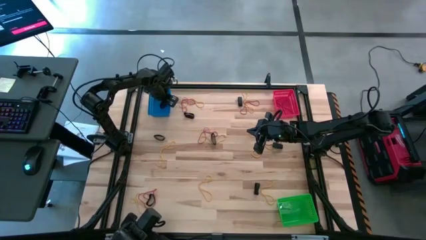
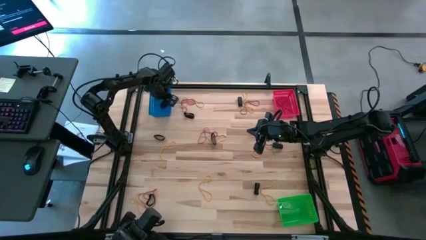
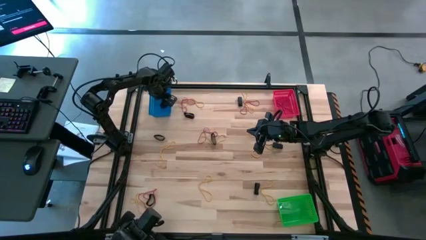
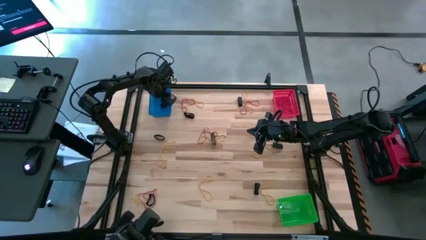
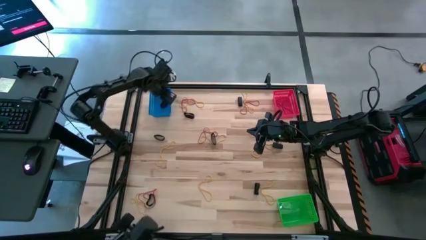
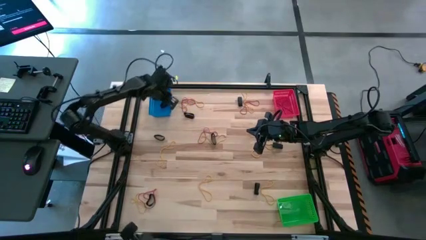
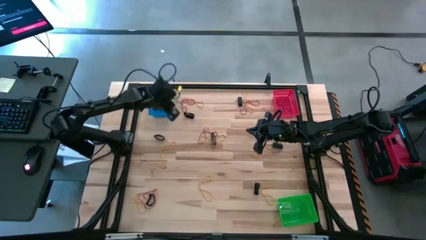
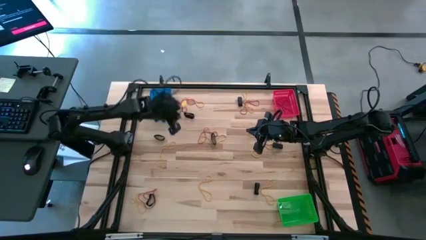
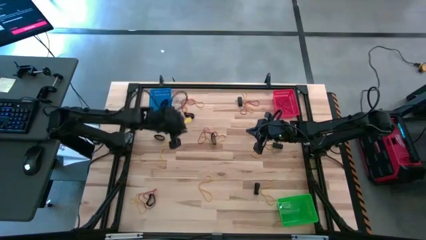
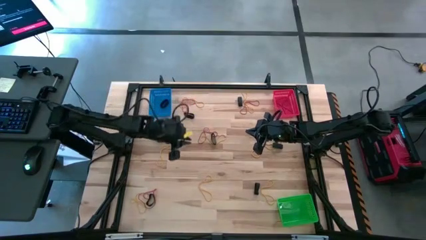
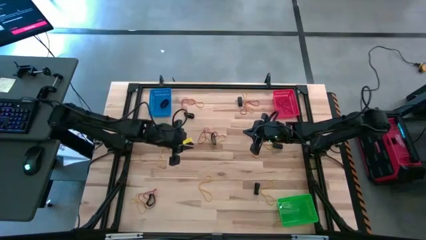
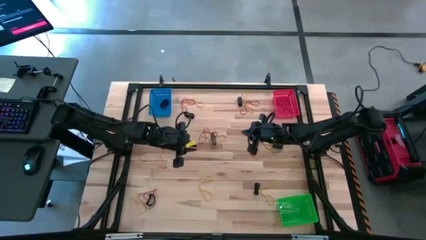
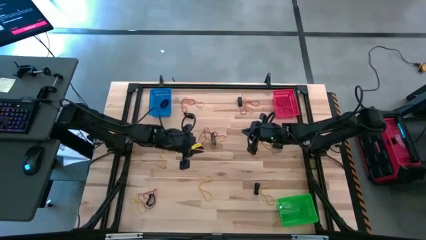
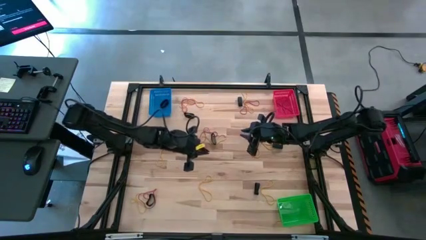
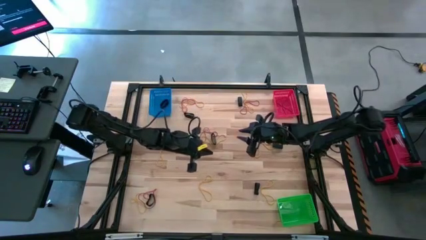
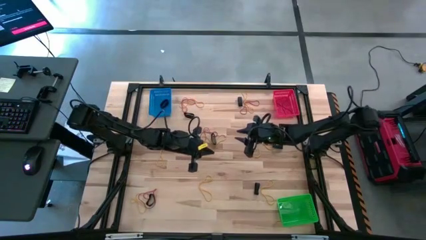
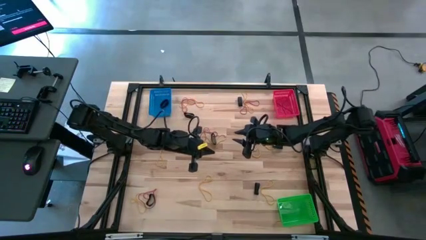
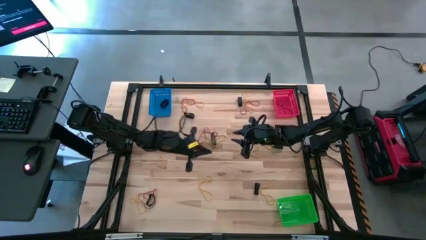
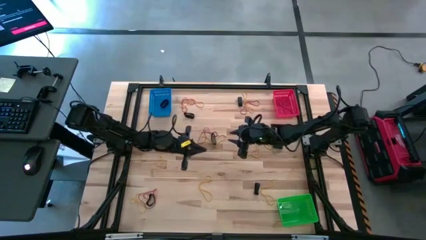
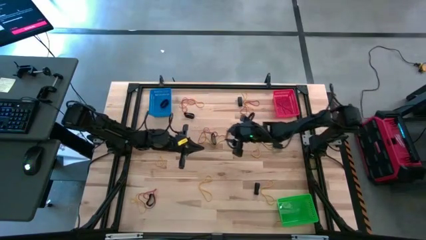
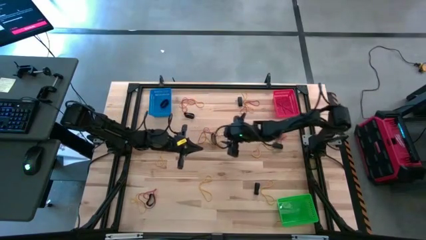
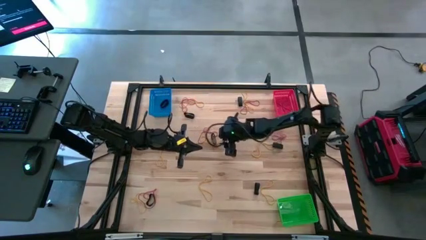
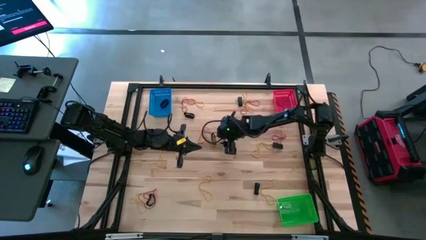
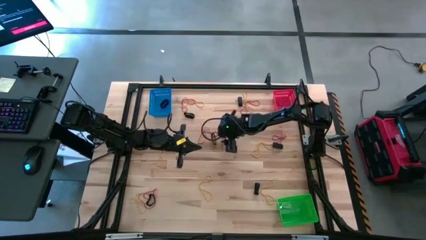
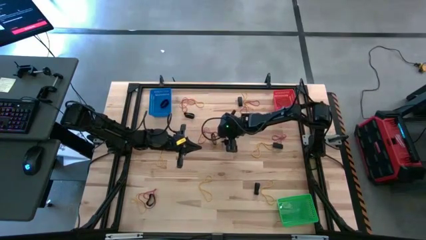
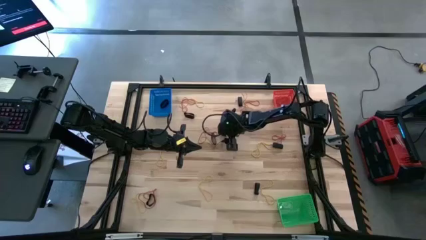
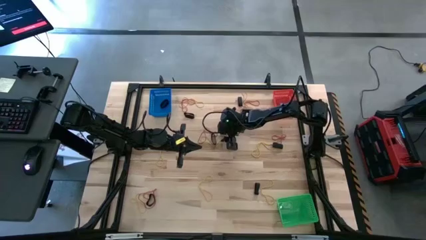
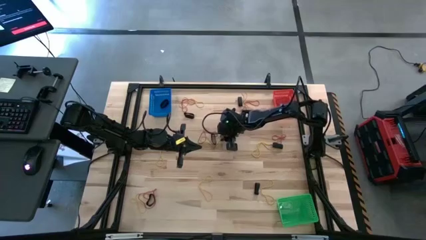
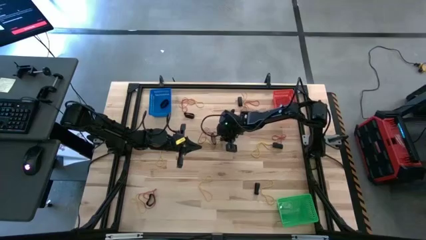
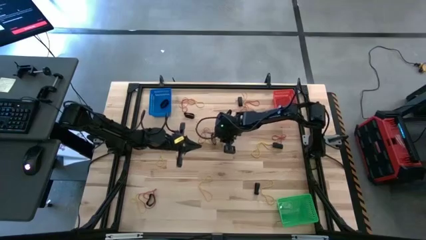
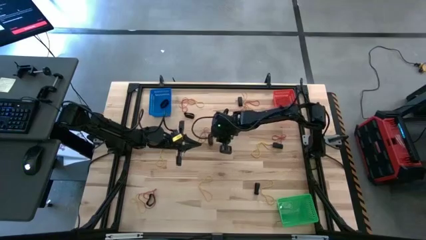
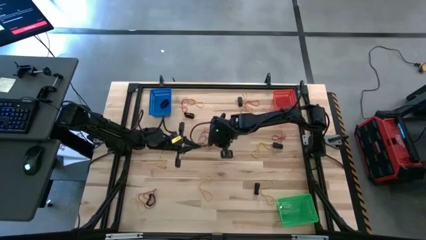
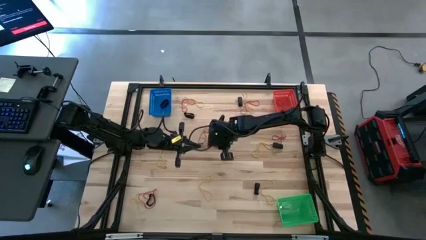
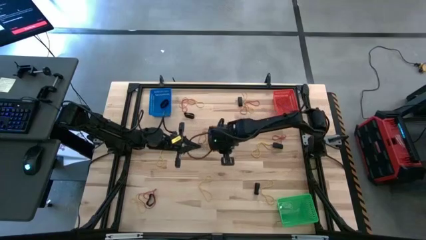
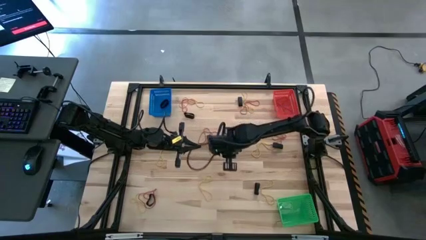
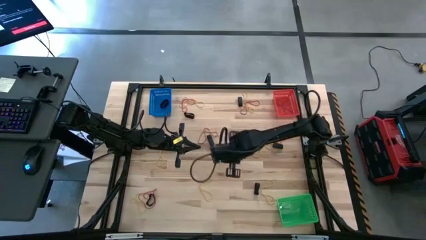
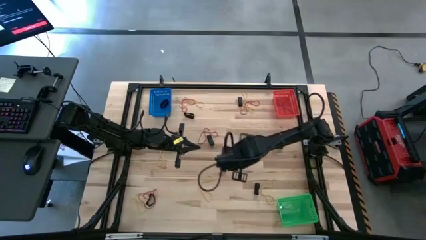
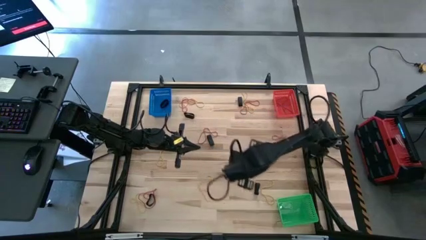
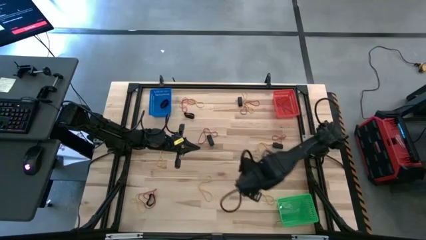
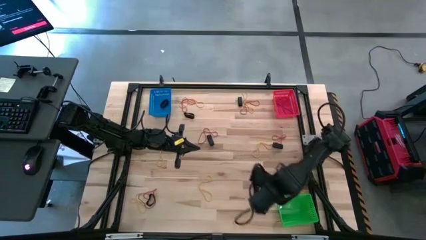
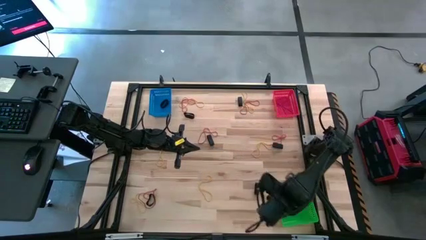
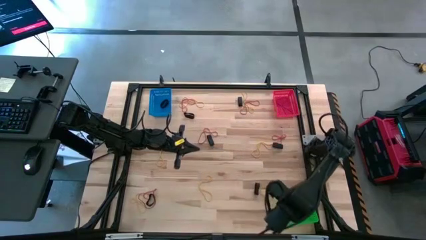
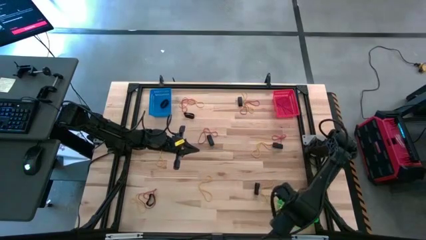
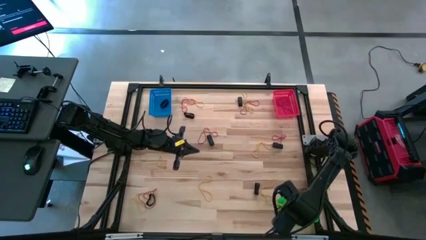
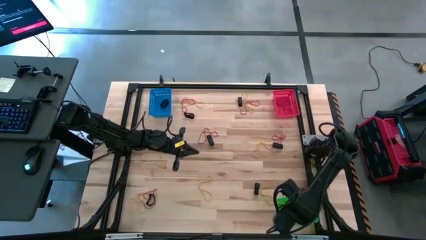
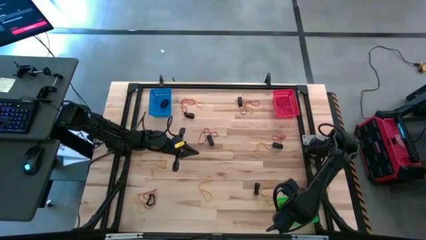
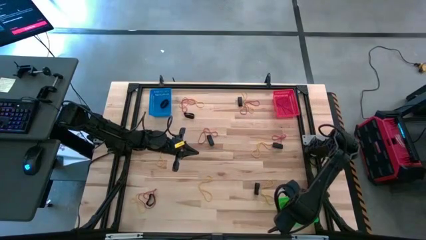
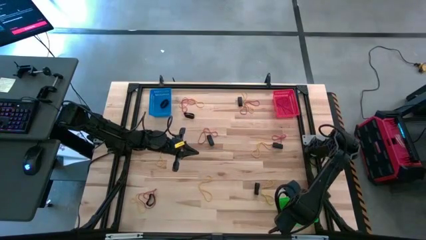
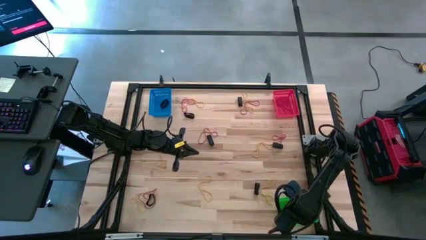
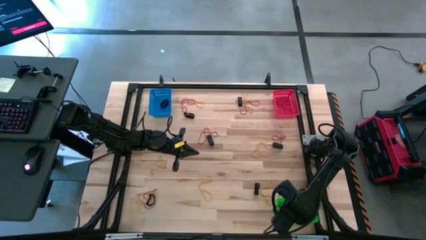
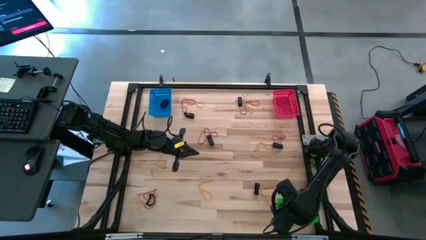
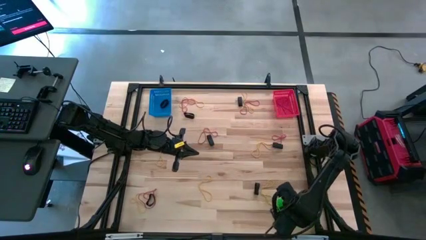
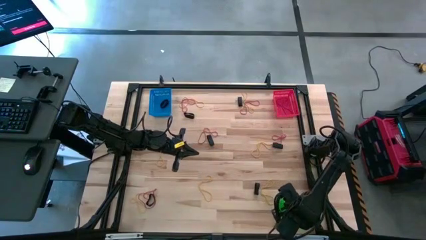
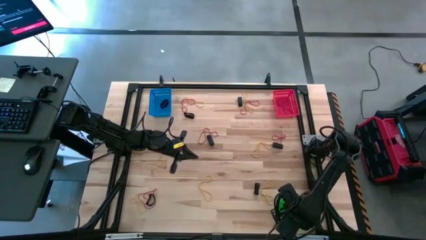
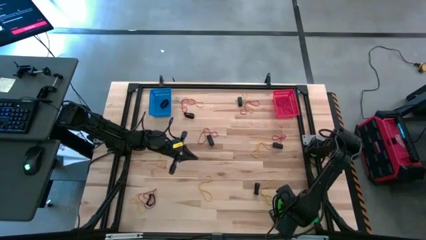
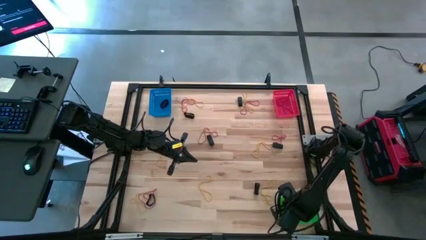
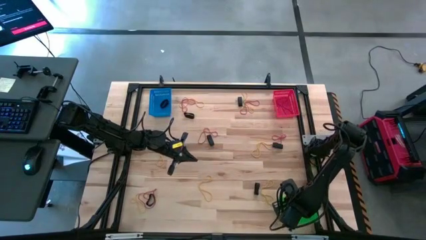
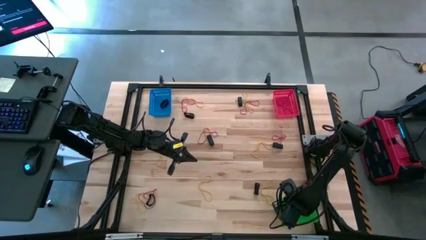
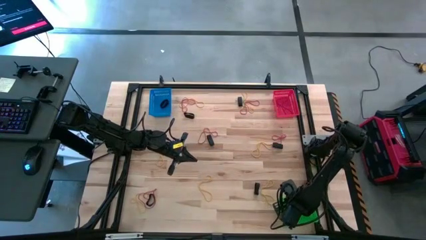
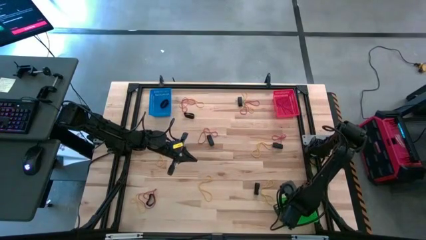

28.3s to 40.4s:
Task: Sort rubber bands into baskets
Put the yellow rubber band into the green bin
